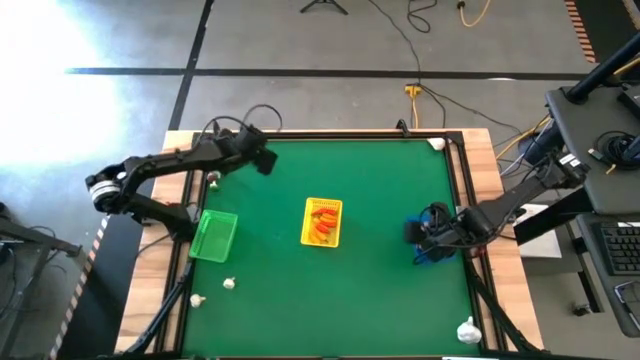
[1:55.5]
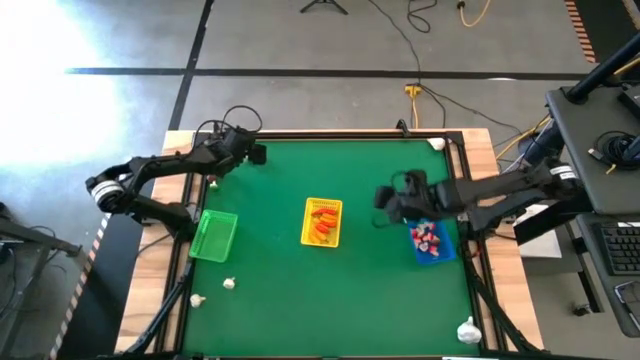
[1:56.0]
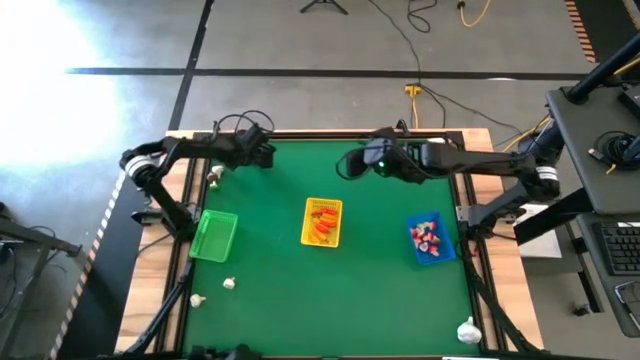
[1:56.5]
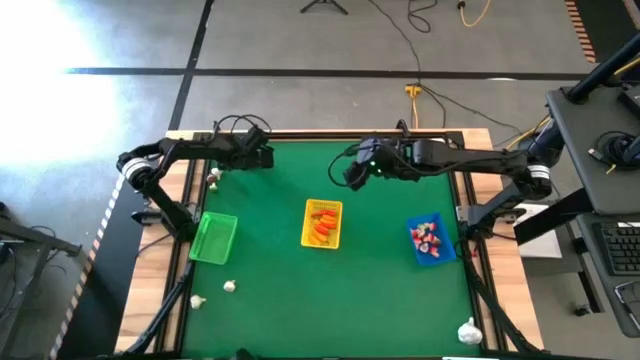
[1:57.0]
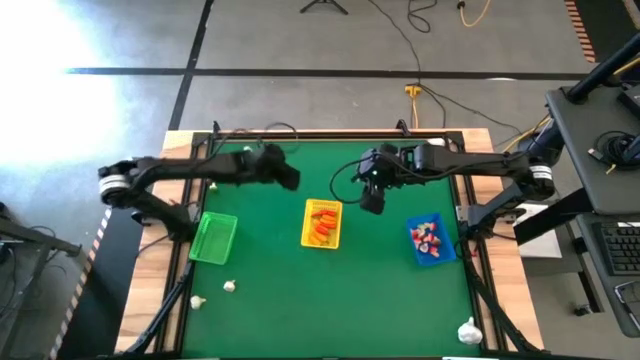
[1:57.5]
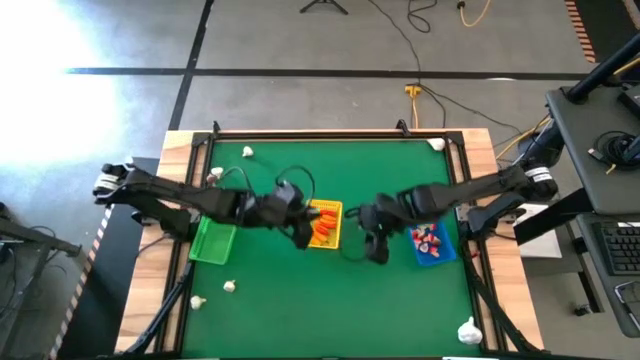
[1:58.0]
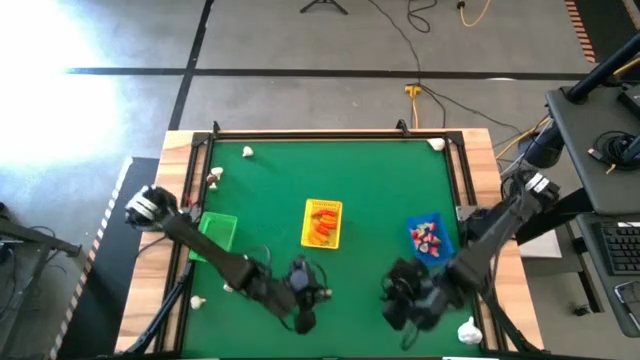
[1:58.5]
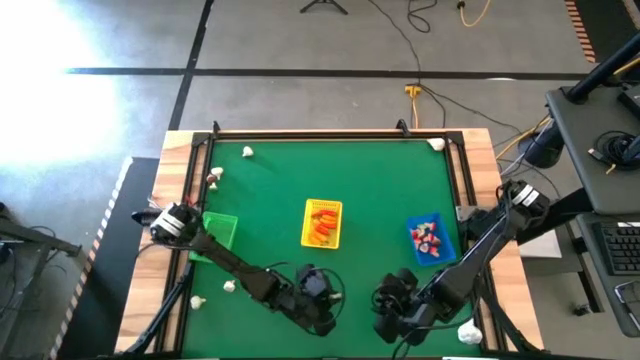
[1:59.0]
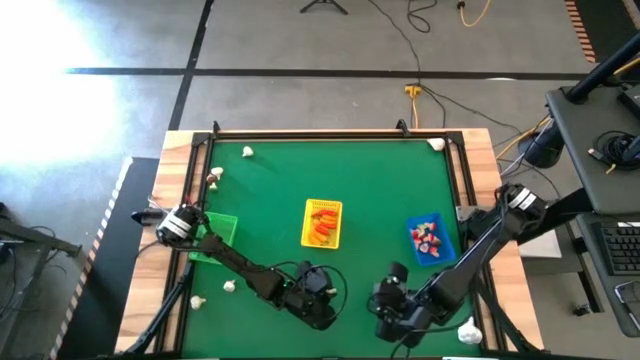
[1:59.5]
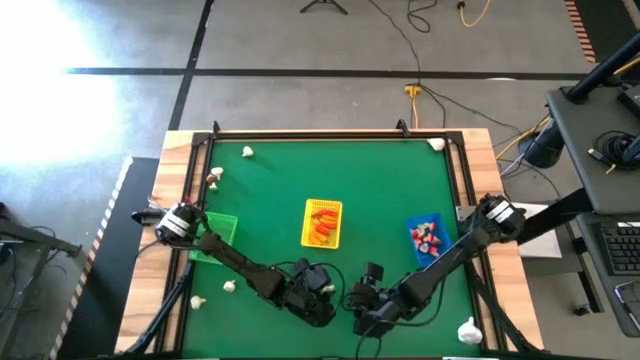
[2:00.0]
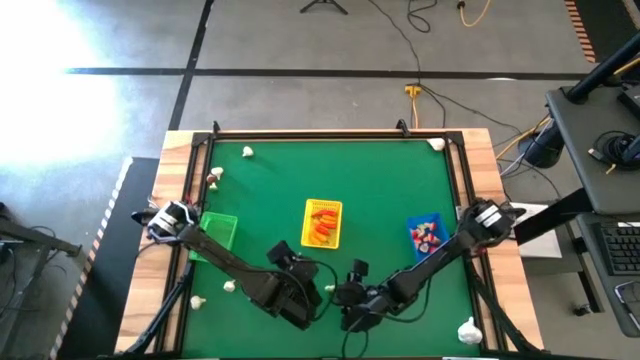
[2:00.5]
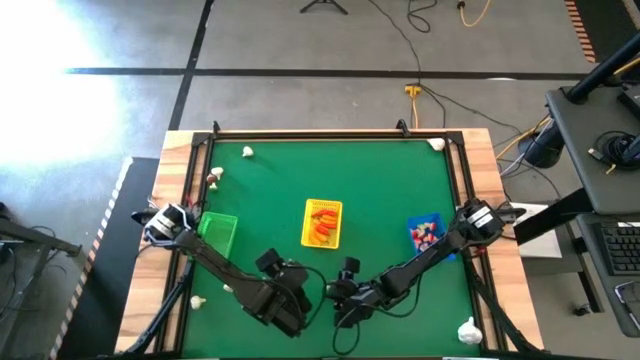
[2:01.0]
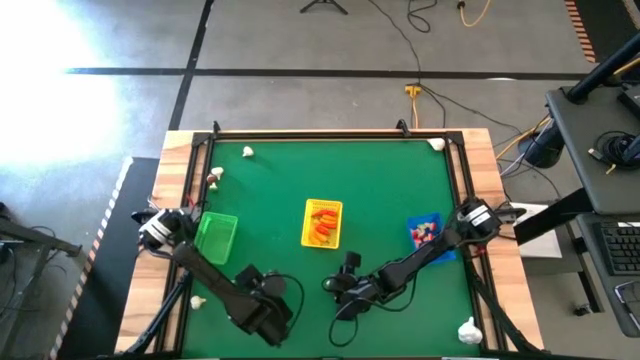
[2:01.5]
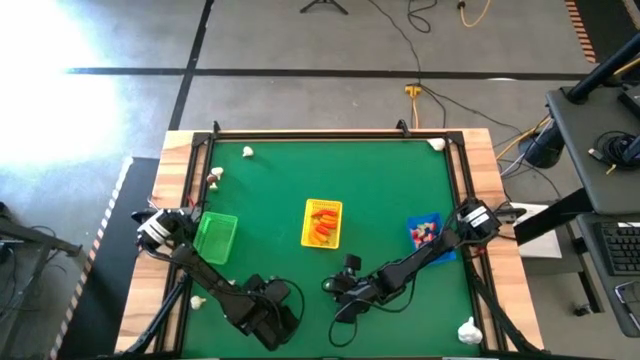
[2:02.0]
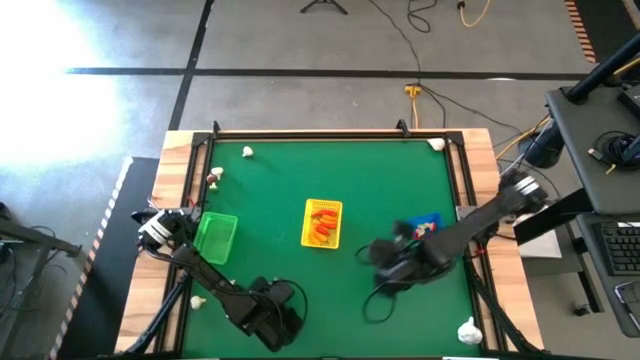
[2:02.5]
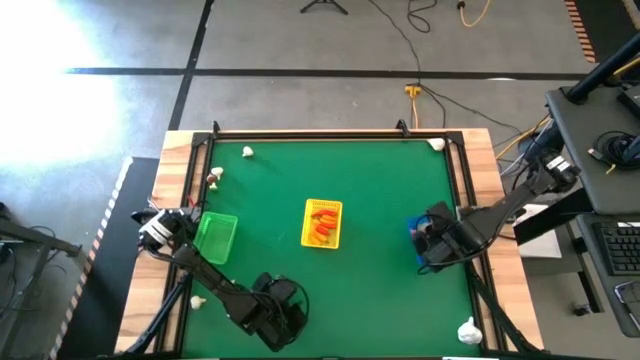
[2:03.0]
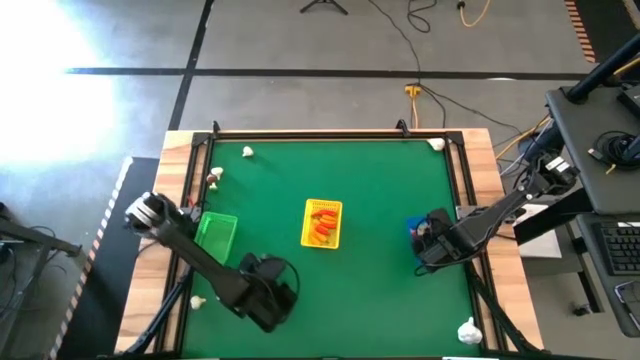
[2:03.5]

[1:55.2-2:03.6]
Task: Sort produce into baskets
Put the green mushroom into the blue bin

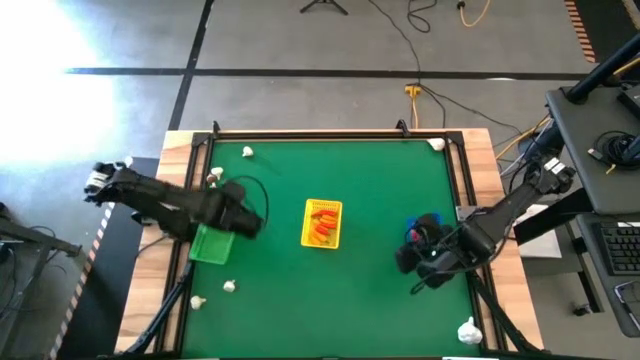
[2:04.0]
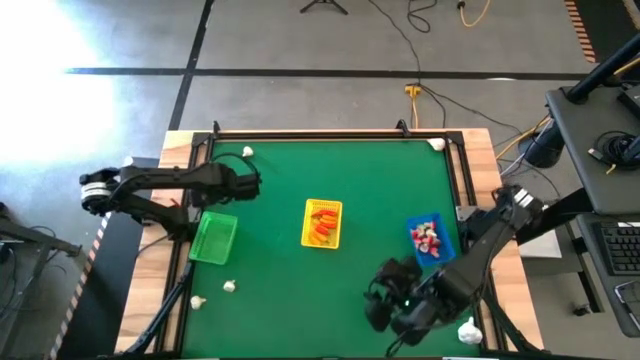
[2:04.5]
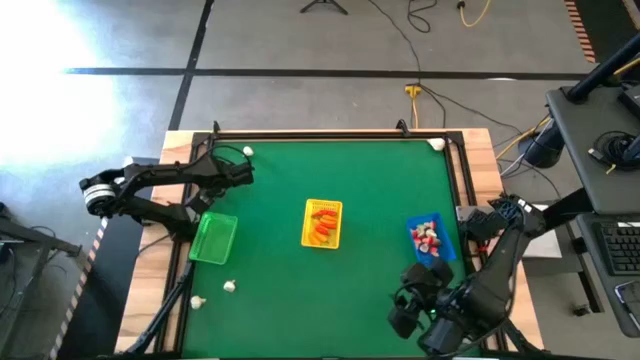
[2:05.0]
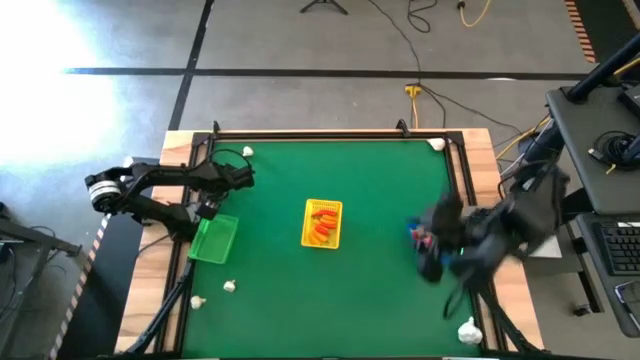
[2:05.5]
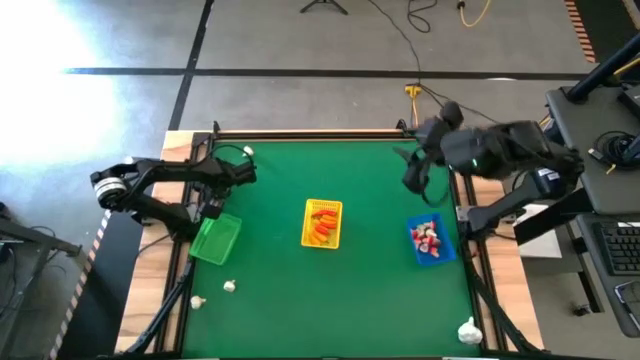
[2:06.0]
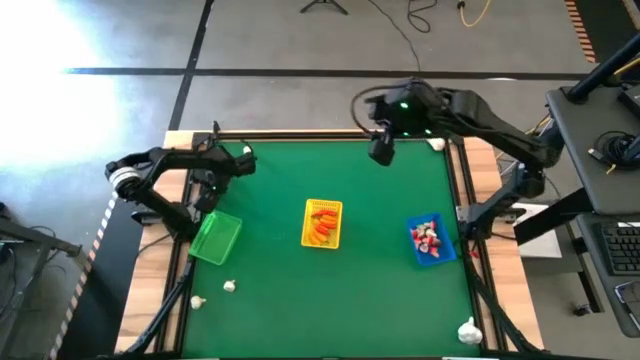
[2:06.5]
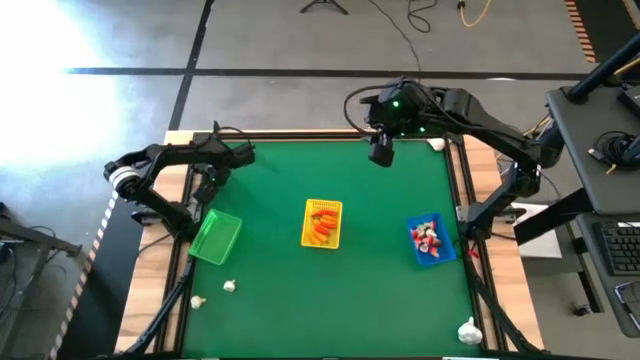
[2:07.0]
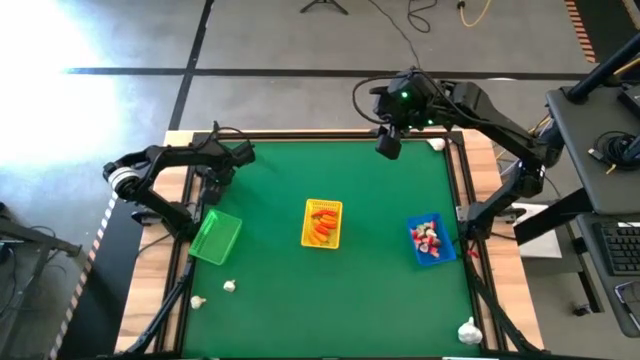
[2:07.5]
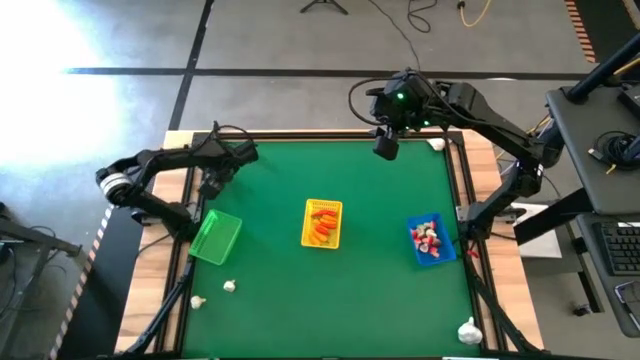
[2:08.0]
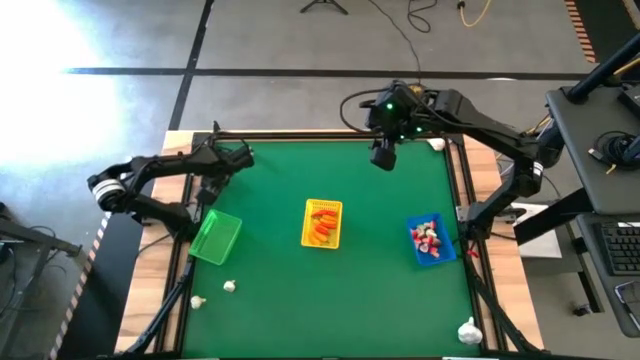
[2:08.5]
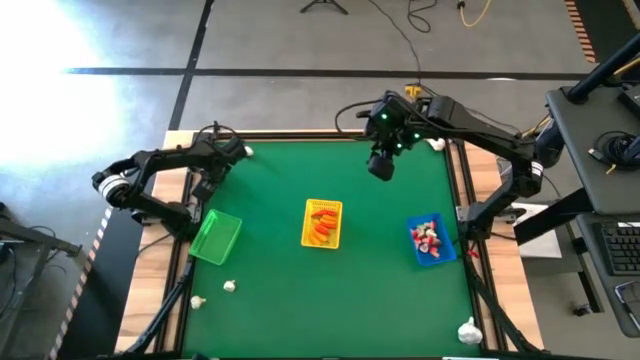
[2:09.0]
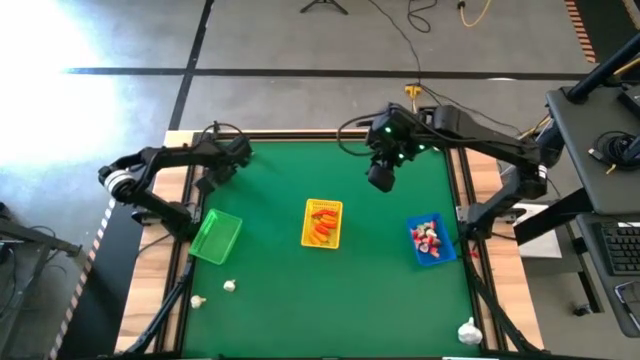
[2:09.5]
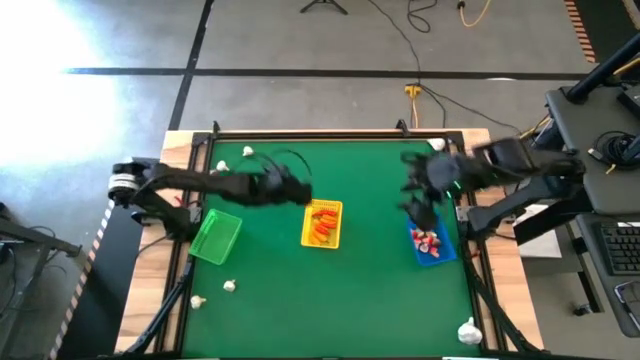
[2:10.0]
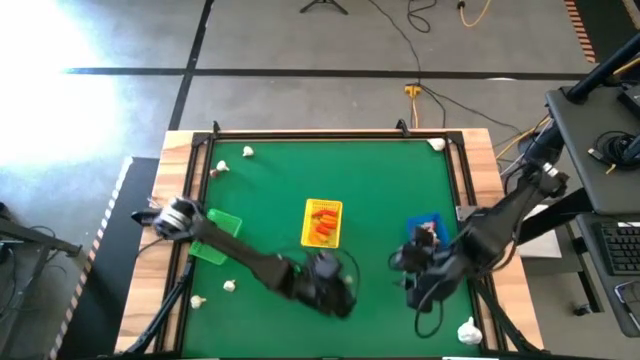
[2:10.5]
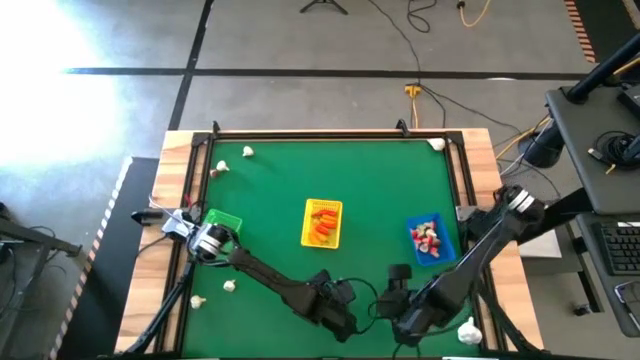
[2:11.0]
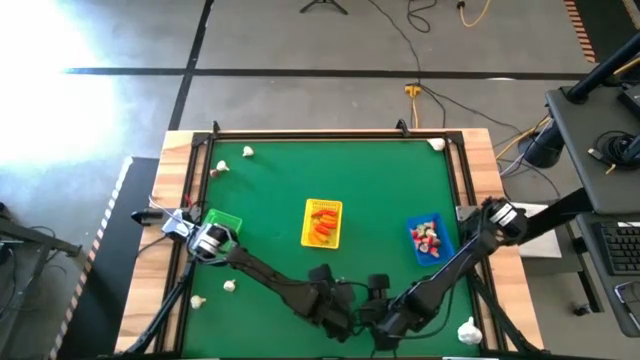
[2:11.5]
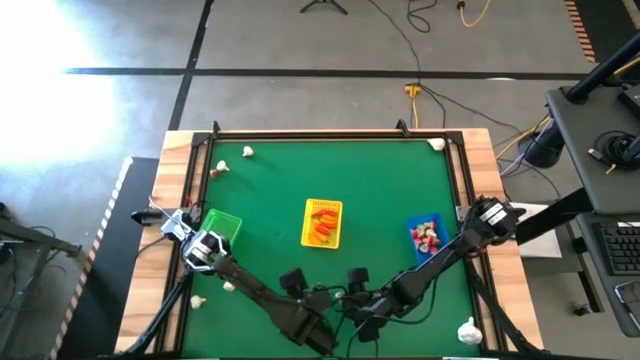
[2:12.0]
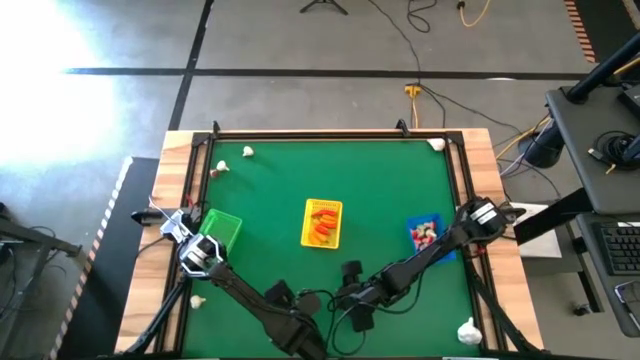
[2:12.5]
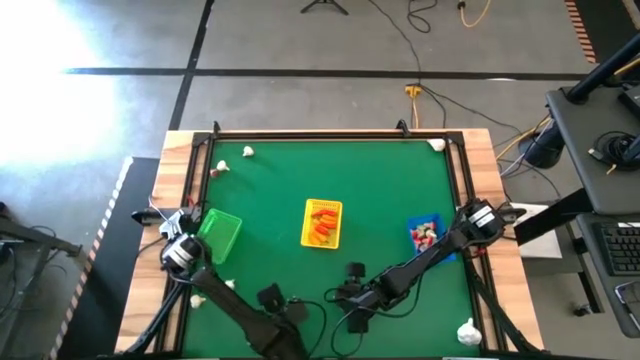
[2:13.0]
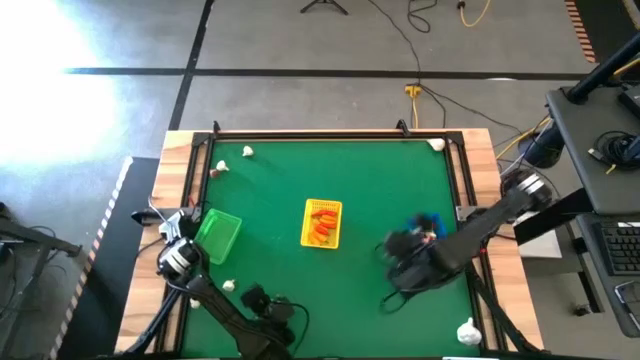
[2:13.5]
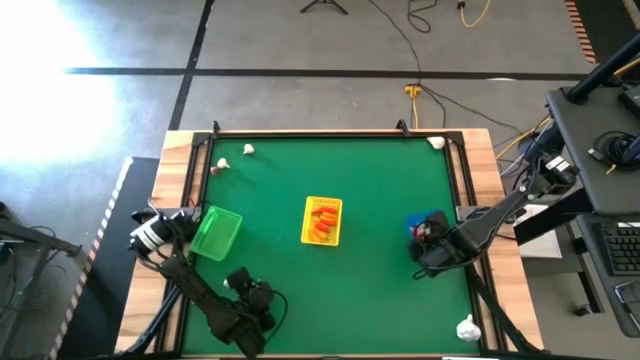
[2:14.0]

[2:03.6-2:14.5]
Put the green mushroom into the blue bin

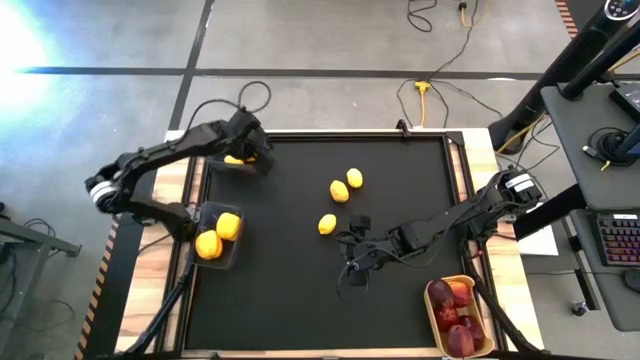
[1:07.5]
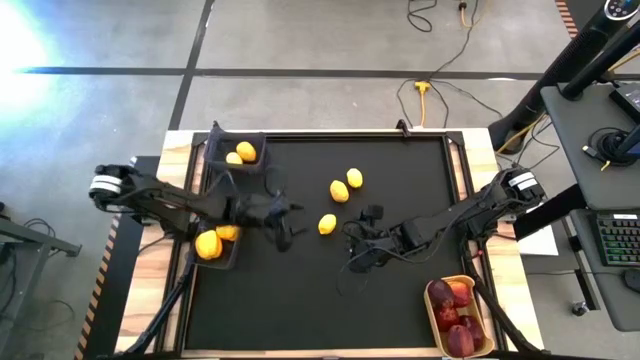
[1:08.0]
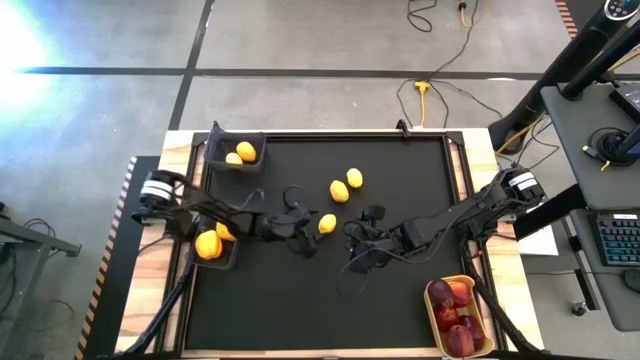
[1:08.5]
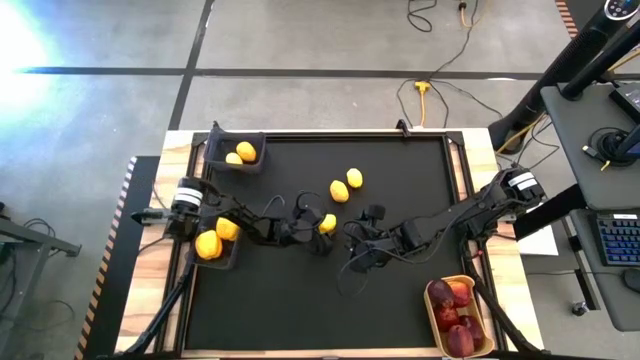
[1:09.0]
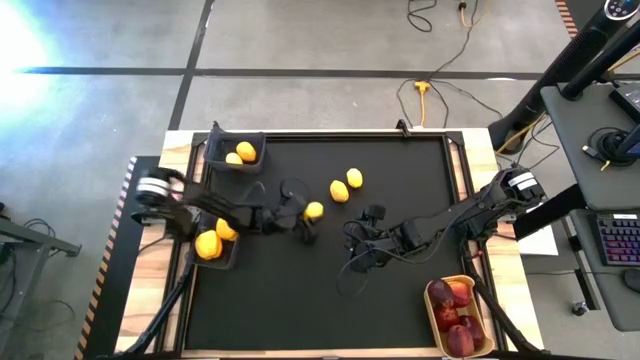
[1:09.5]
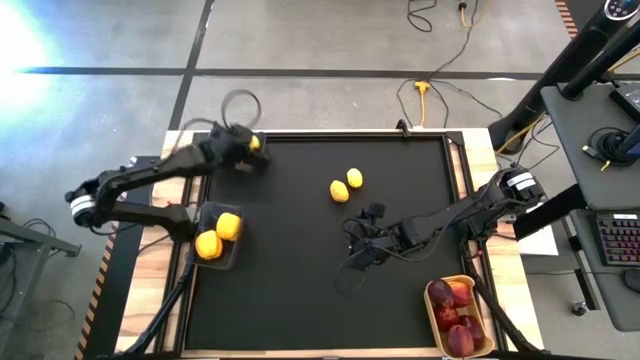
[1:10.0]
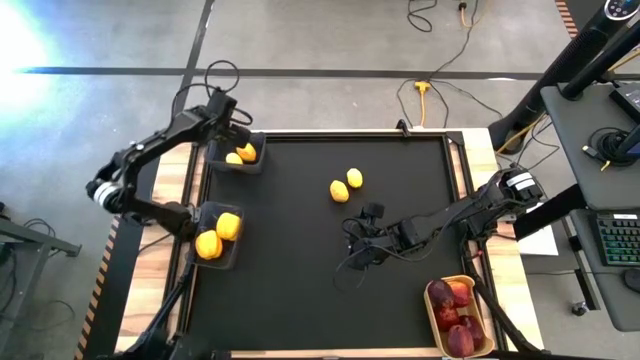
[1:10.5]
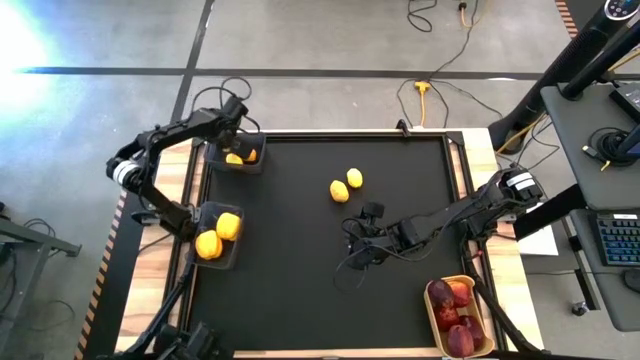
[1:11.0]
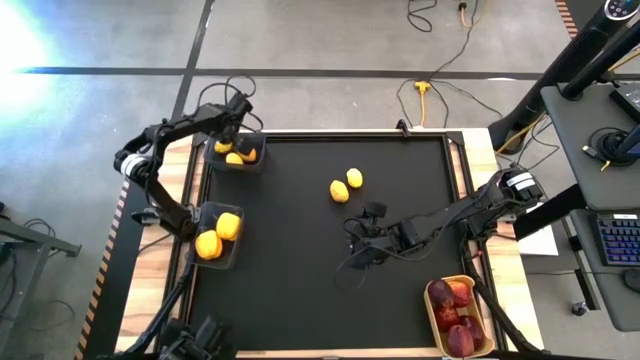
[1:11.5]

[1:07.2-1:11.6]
Task: Sort produce into baskets
Put the lemon into the top black bin
